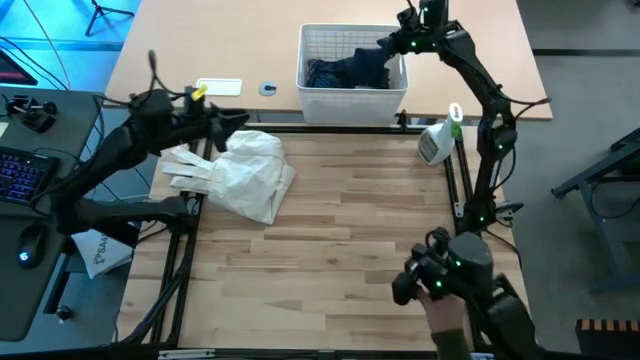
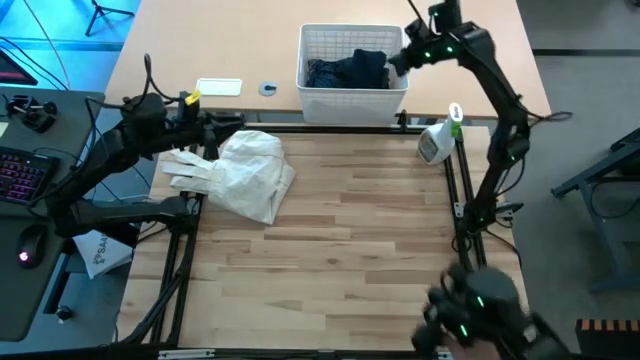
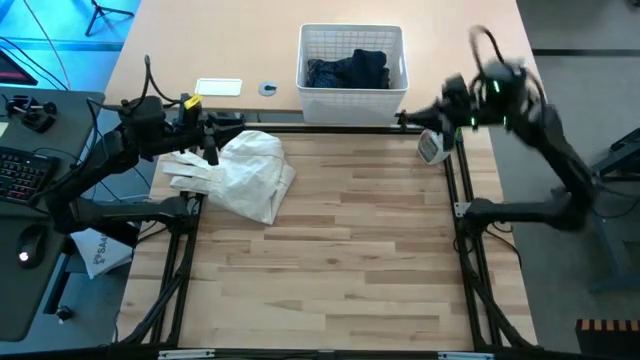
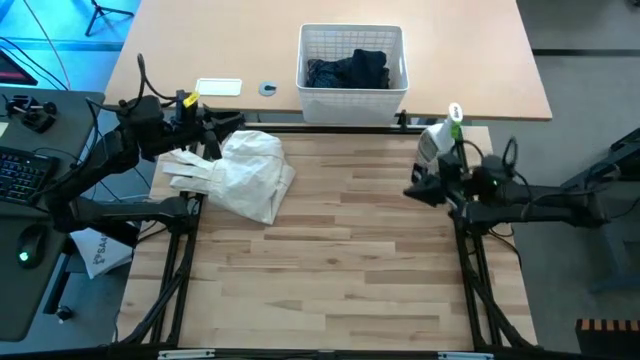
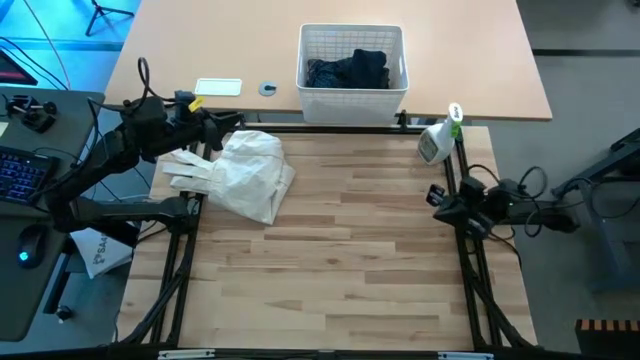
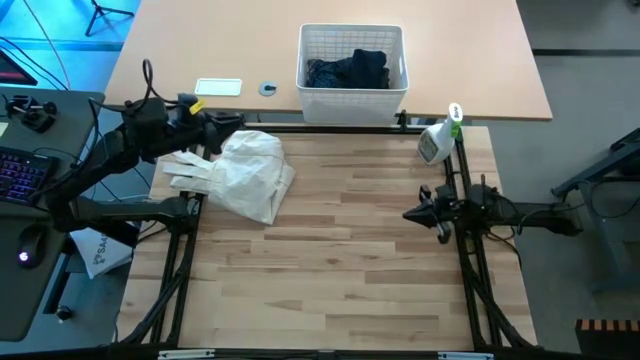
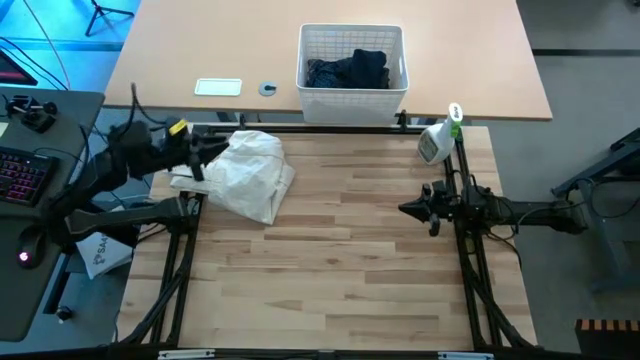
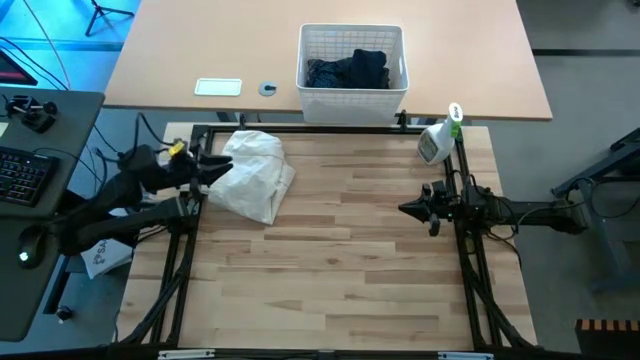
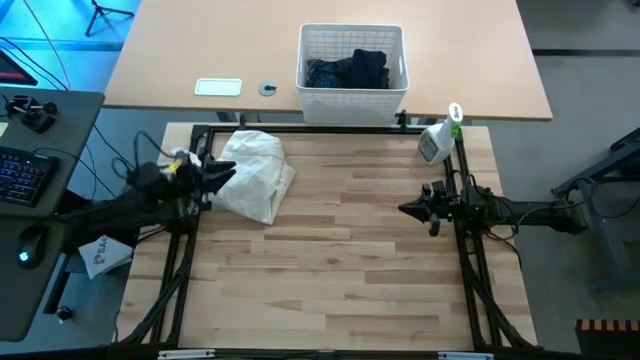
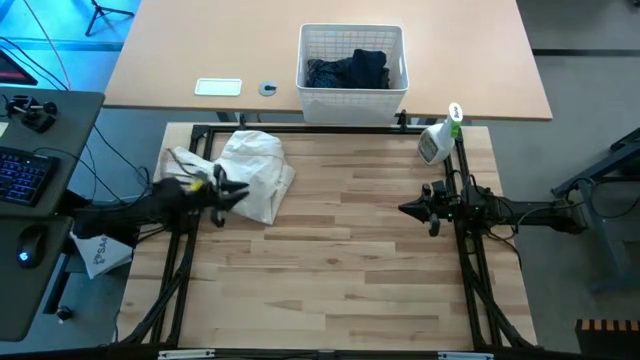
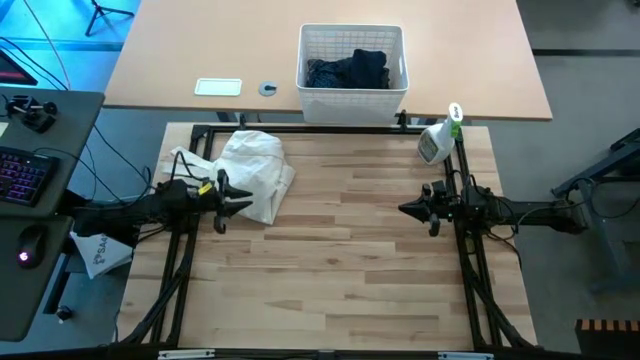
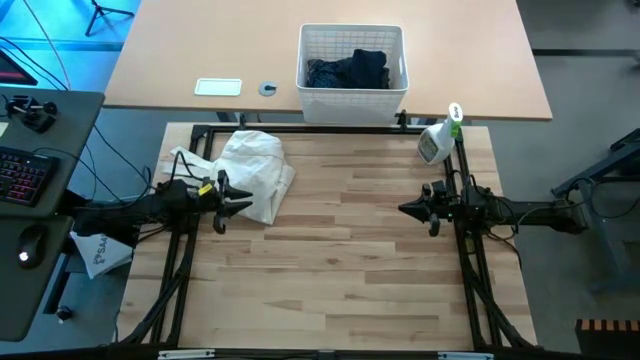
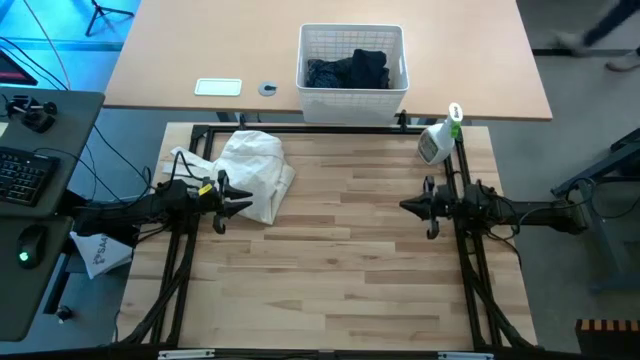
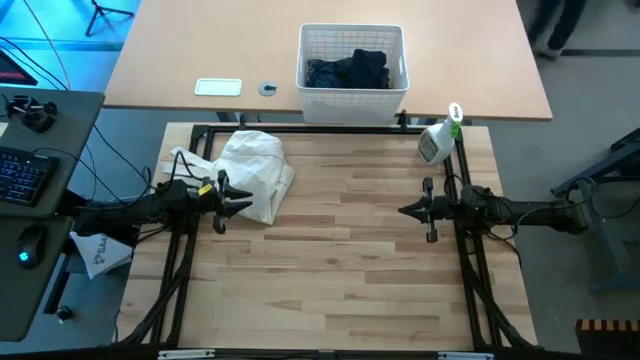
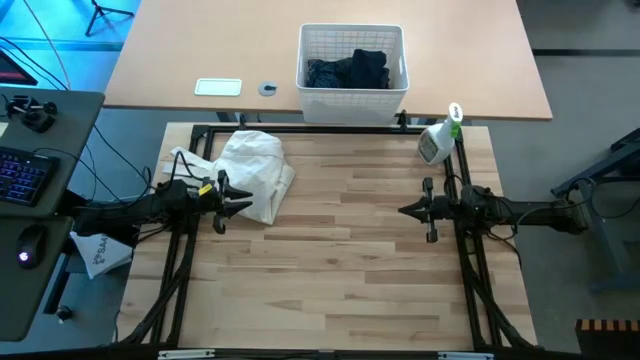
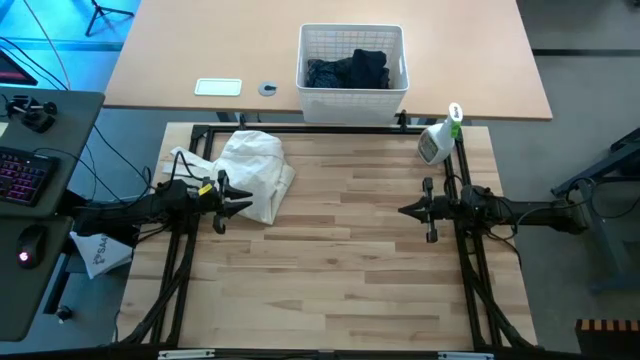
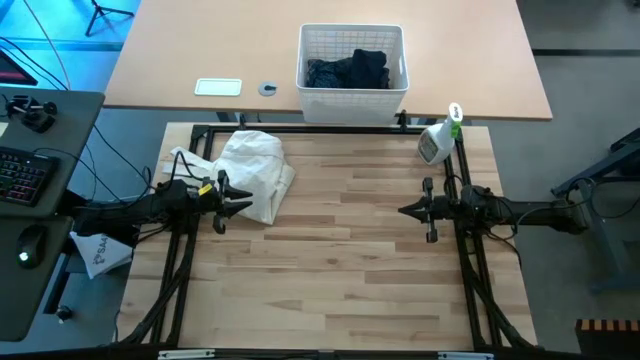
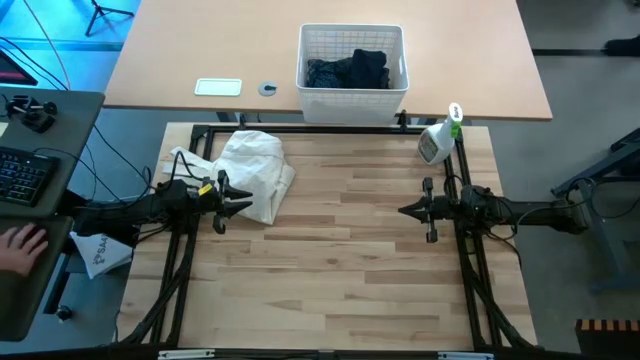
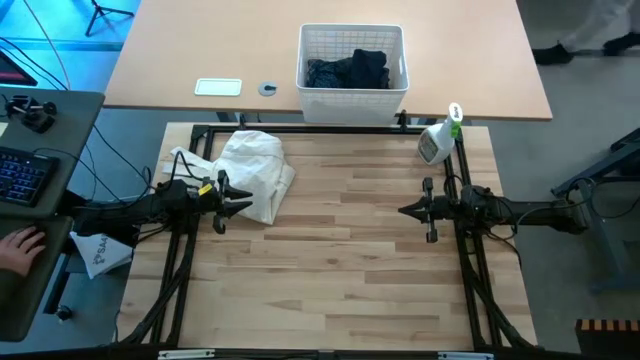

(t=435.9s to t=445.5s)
Task: Fold laundry
Return to Home Position

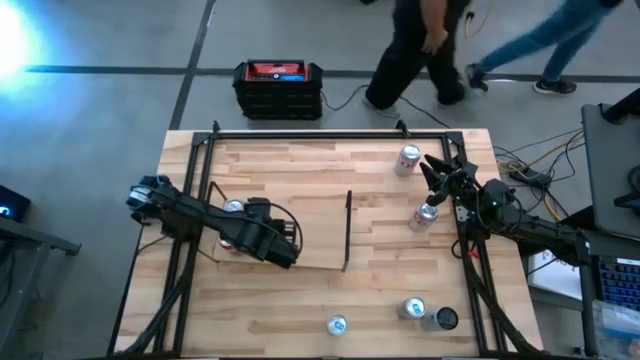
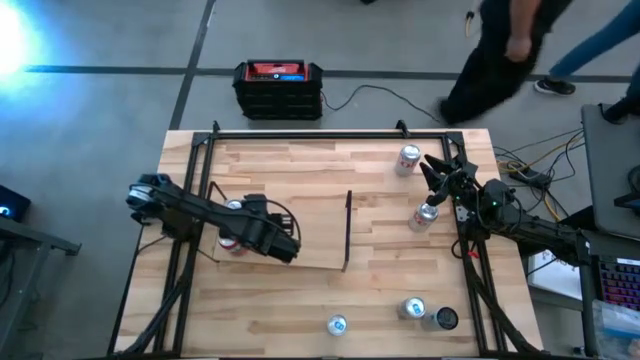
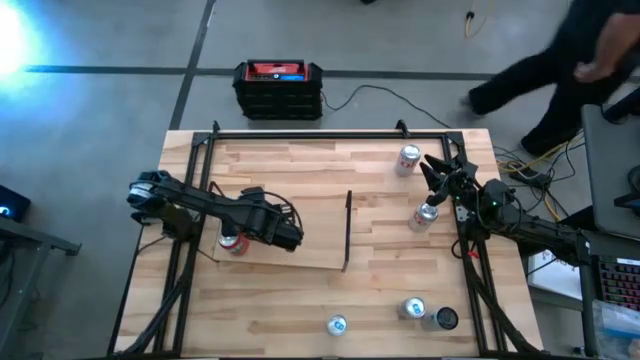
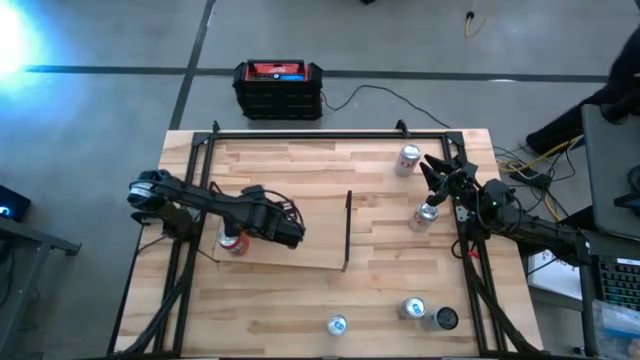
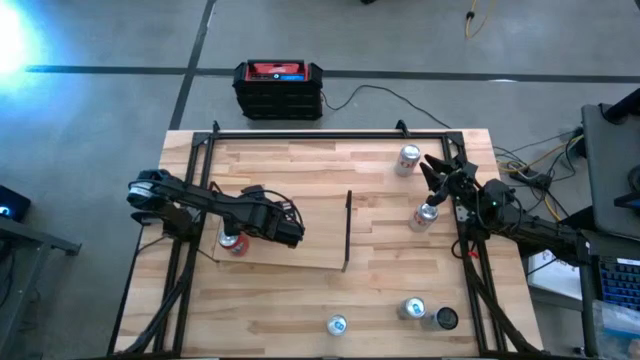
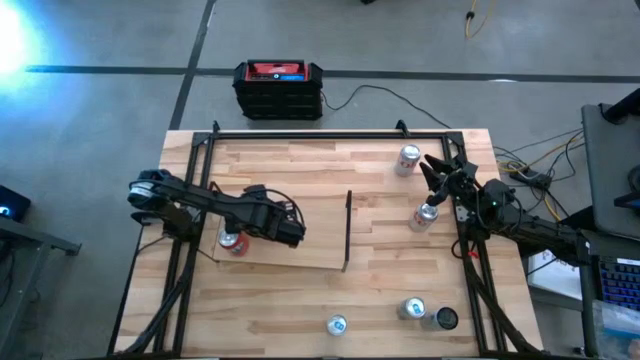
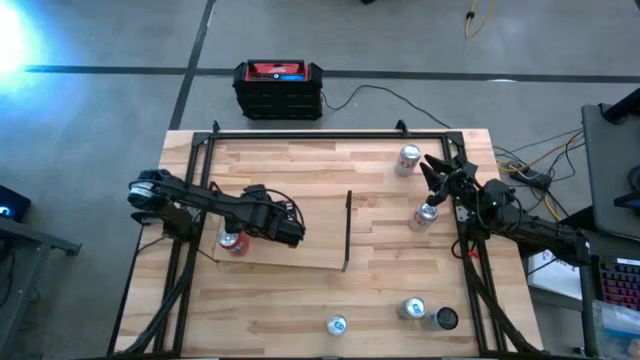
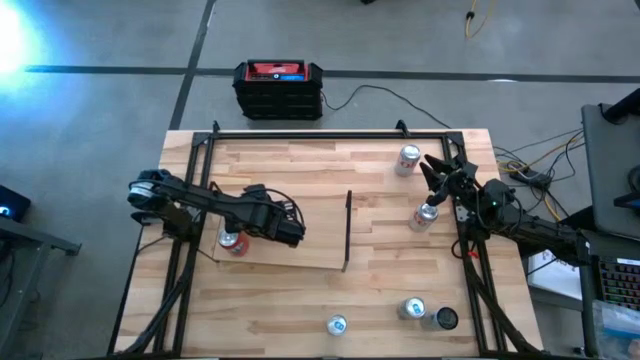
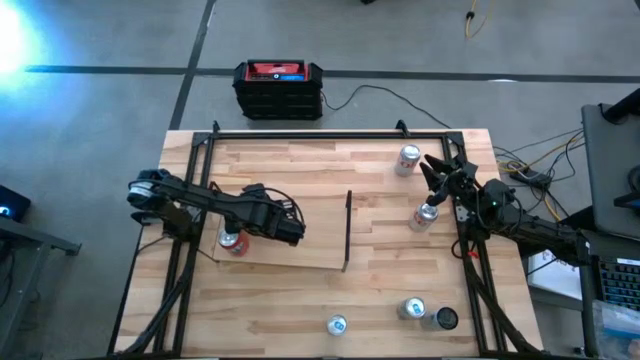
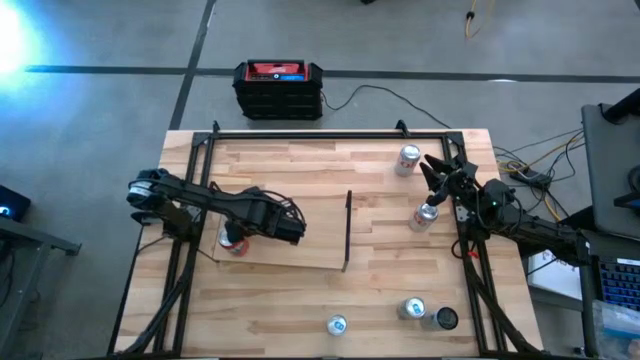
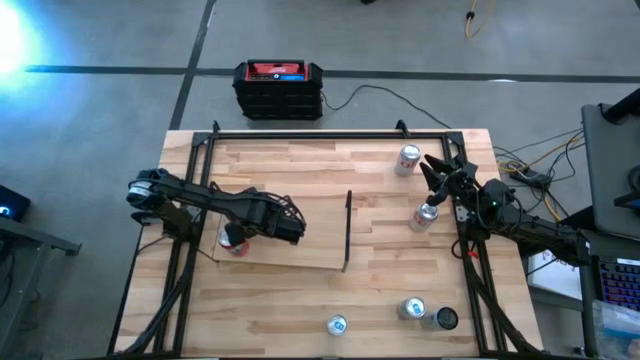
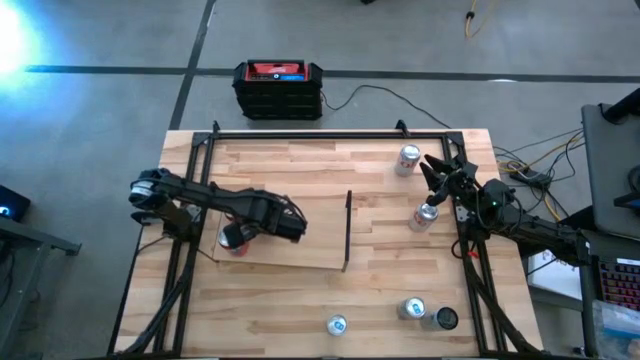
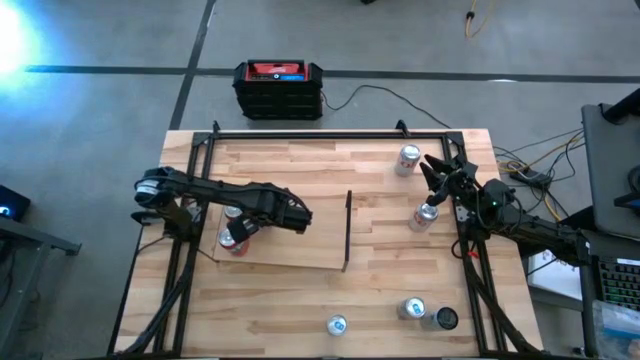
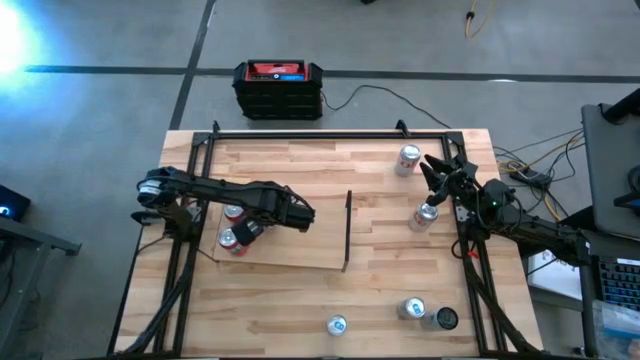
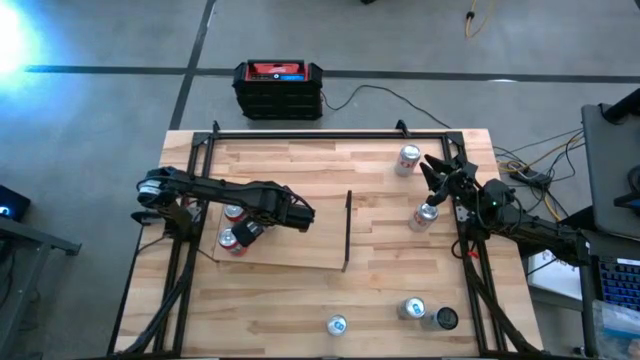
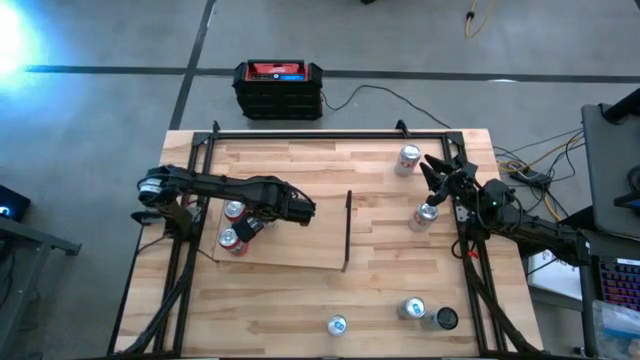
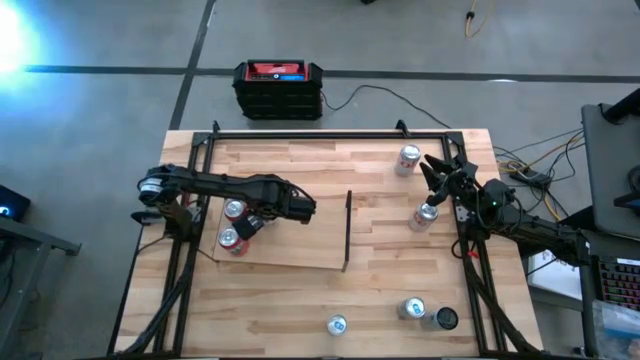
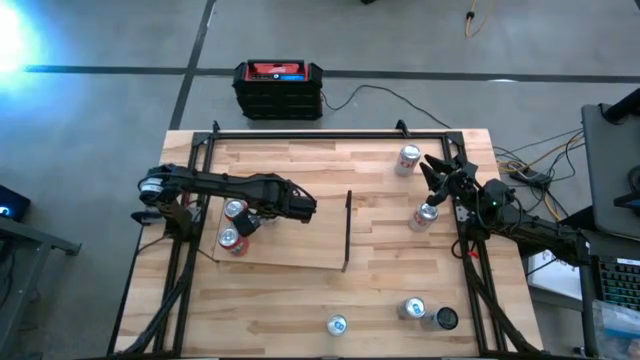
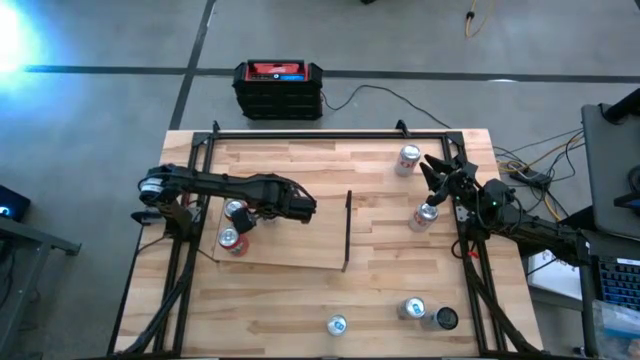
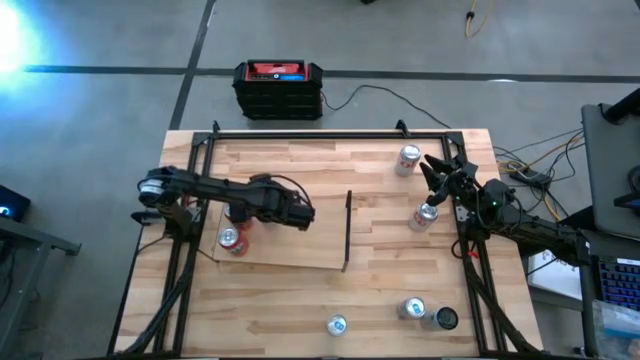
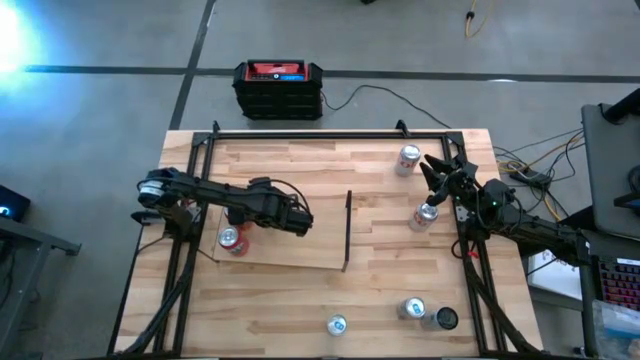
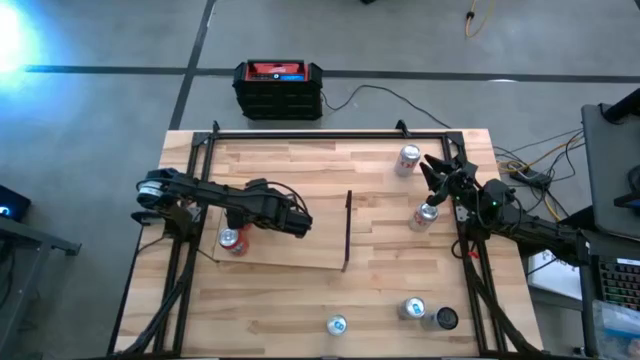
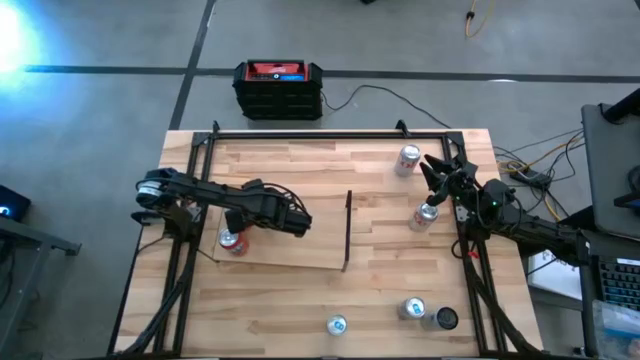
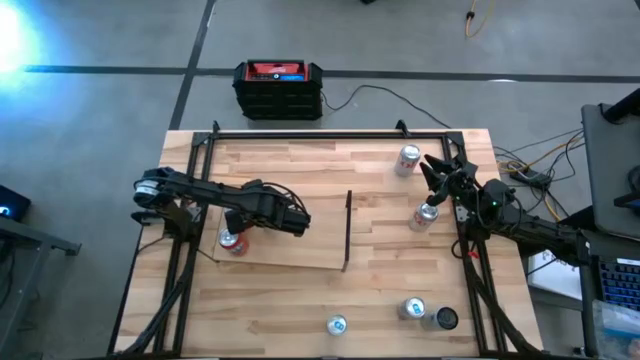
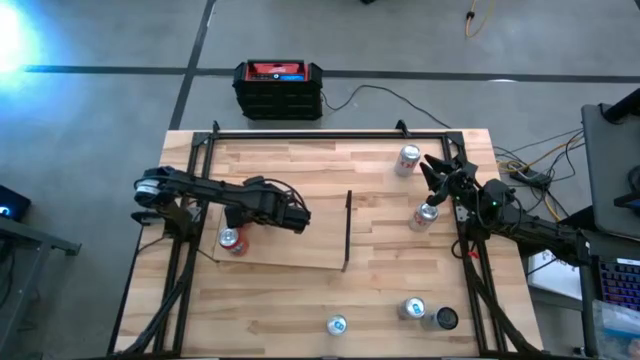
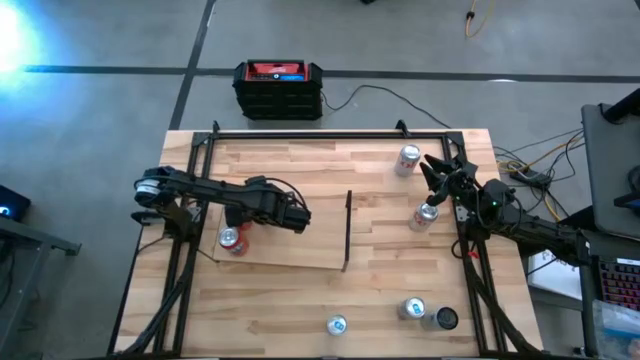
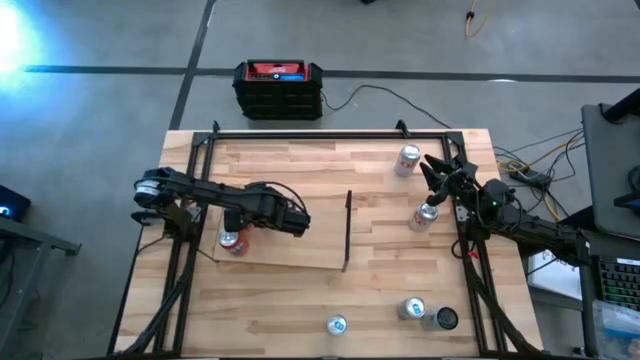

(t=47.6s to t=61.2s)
Task: Place canned beverage on shelf
Put the left white pink soda can on the shelf
